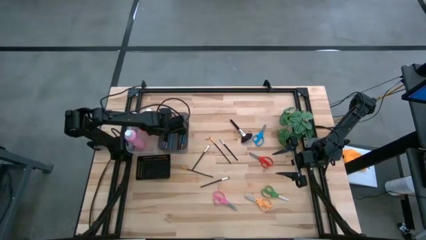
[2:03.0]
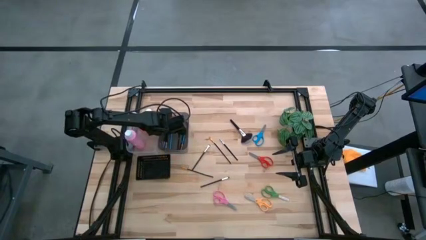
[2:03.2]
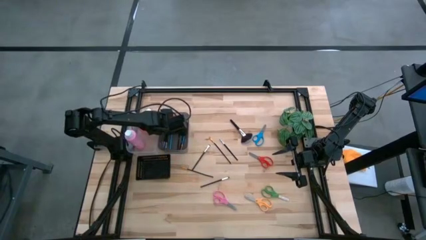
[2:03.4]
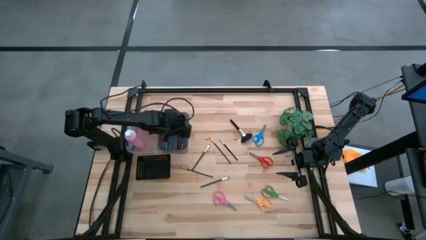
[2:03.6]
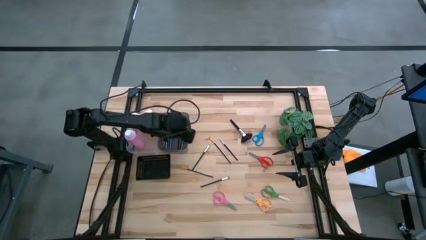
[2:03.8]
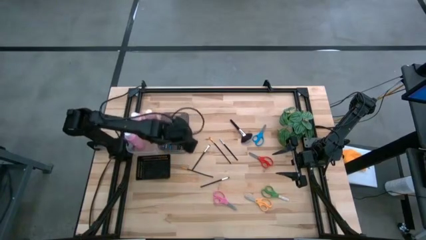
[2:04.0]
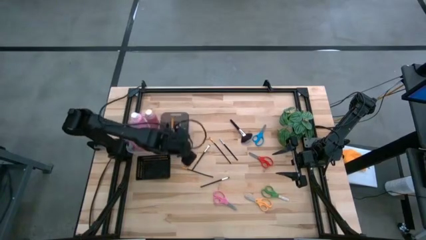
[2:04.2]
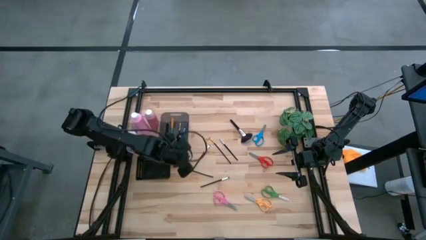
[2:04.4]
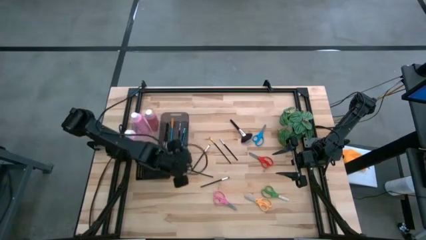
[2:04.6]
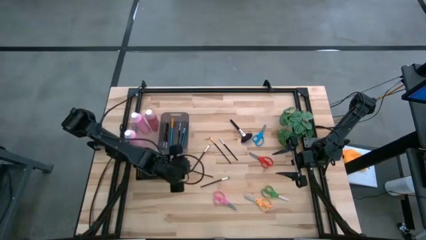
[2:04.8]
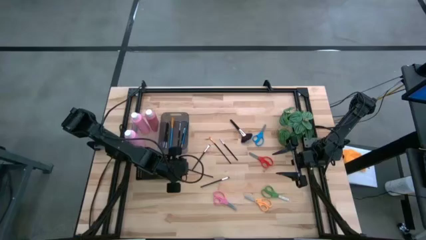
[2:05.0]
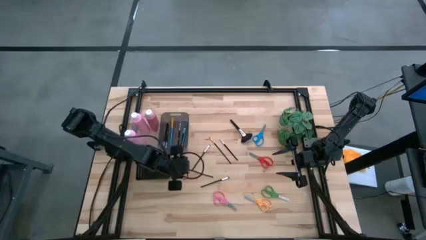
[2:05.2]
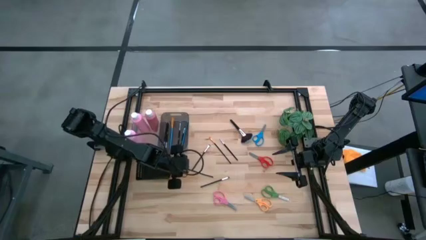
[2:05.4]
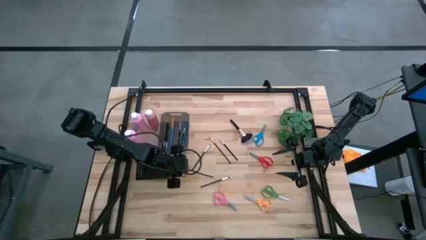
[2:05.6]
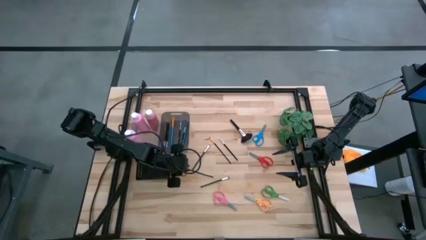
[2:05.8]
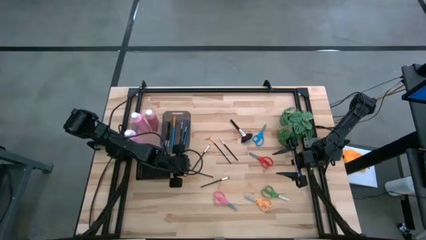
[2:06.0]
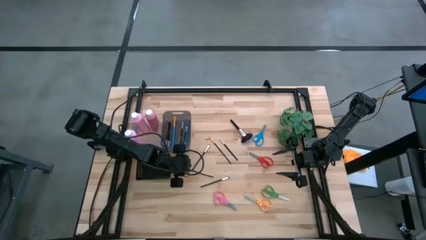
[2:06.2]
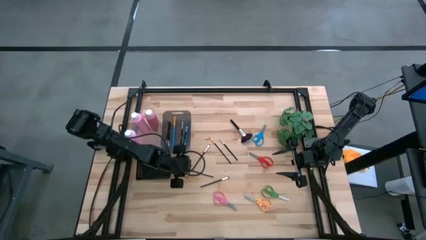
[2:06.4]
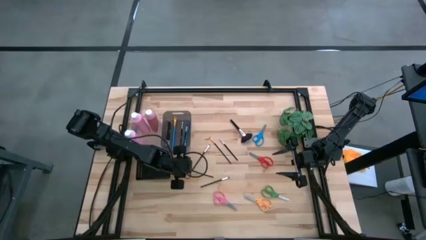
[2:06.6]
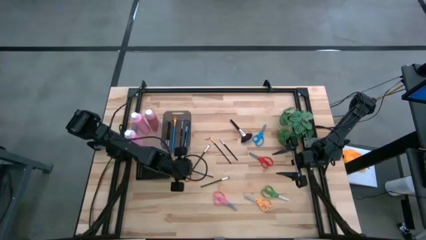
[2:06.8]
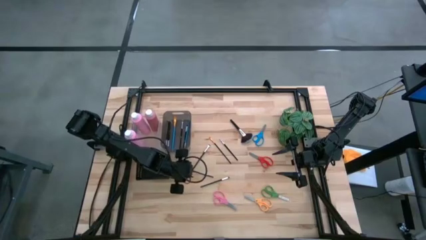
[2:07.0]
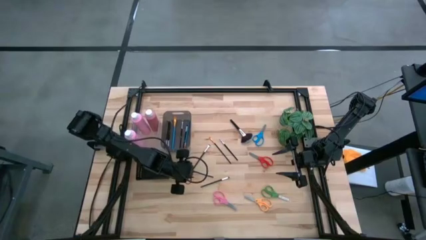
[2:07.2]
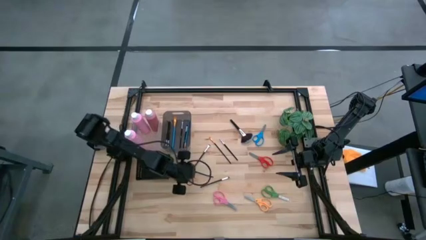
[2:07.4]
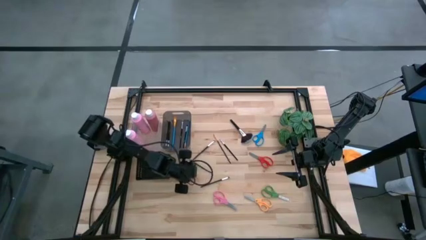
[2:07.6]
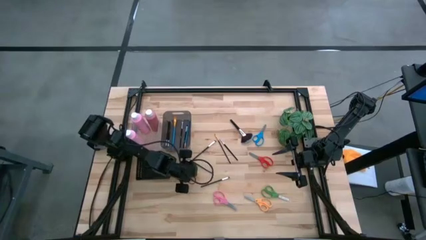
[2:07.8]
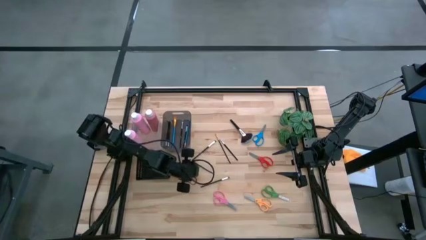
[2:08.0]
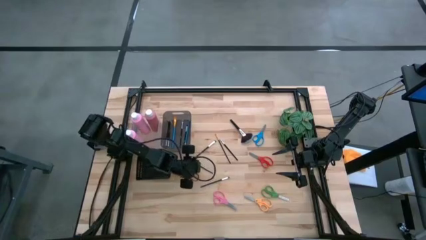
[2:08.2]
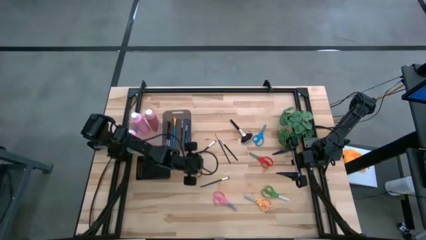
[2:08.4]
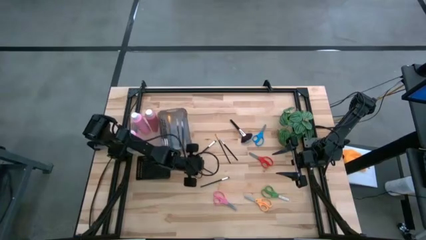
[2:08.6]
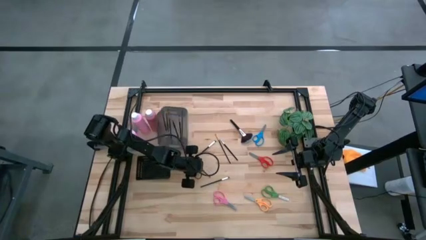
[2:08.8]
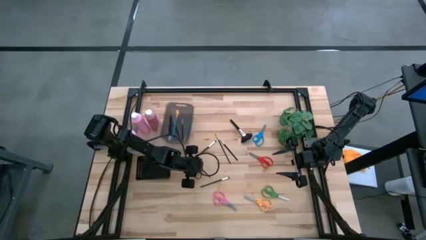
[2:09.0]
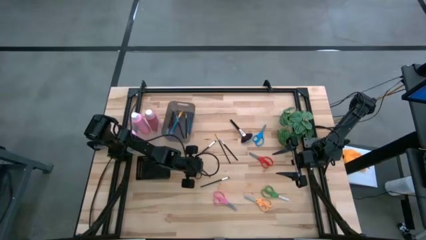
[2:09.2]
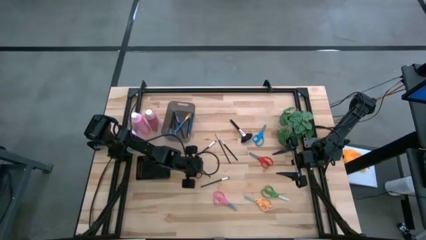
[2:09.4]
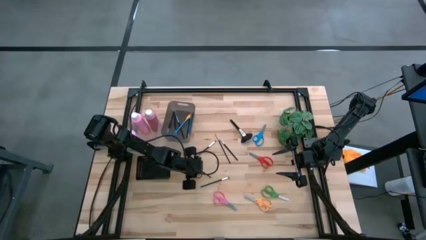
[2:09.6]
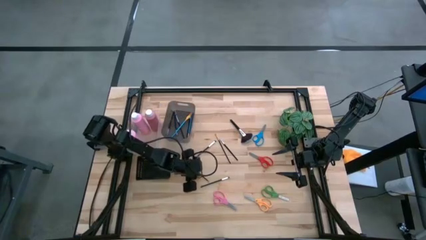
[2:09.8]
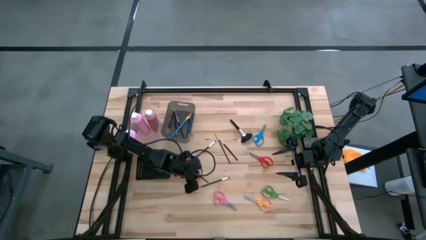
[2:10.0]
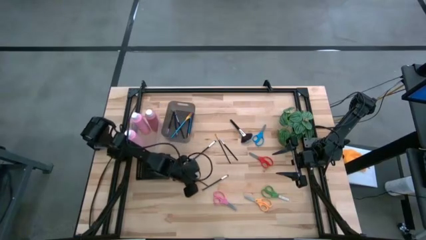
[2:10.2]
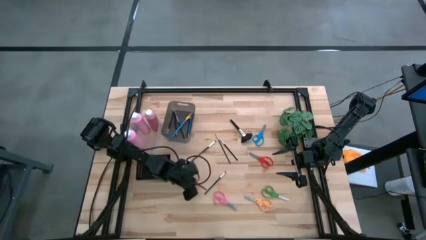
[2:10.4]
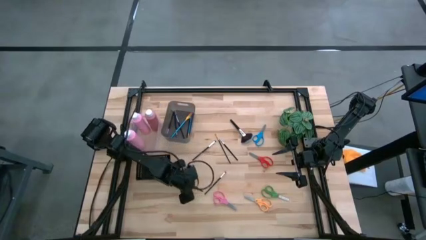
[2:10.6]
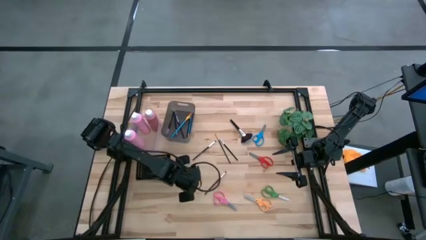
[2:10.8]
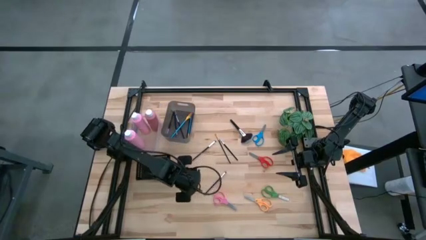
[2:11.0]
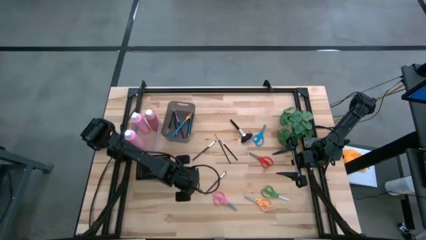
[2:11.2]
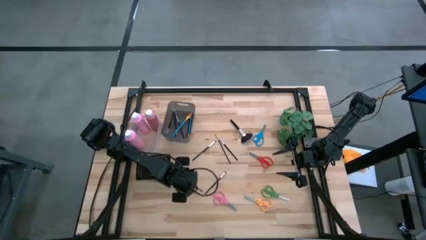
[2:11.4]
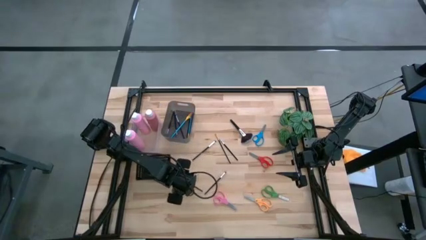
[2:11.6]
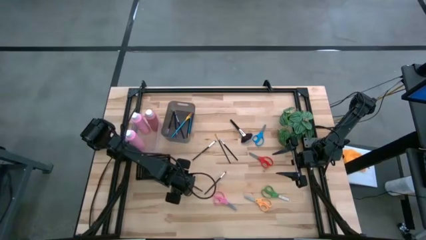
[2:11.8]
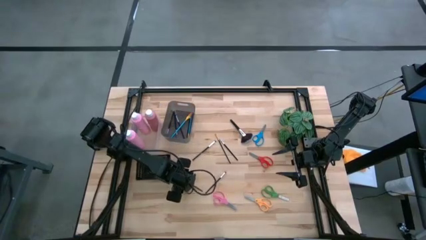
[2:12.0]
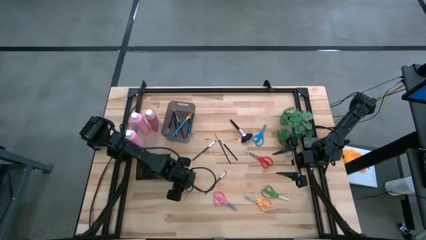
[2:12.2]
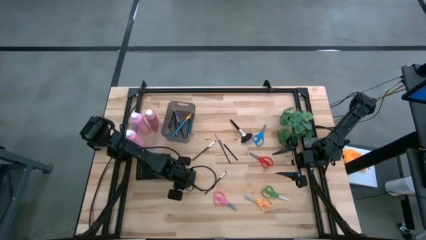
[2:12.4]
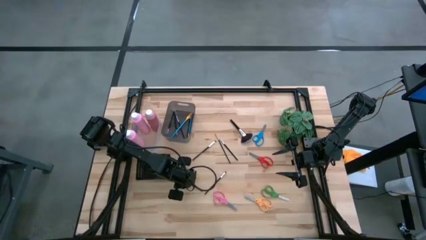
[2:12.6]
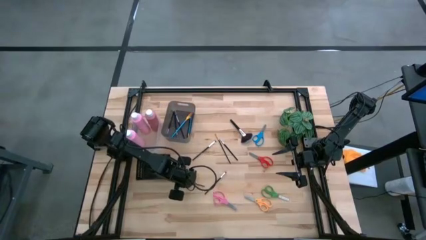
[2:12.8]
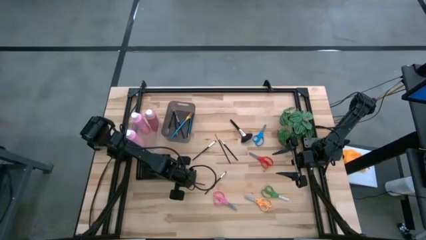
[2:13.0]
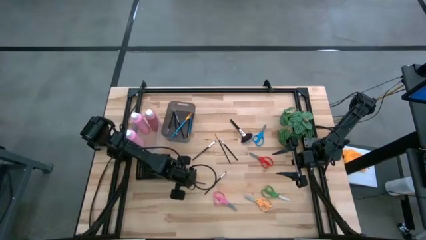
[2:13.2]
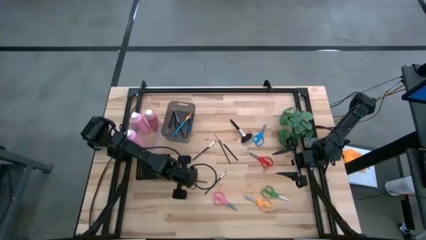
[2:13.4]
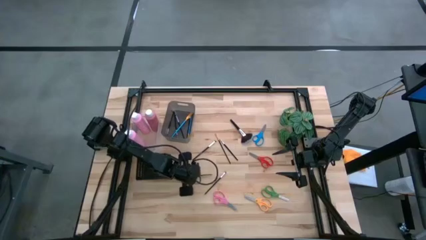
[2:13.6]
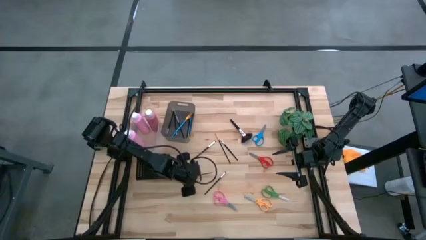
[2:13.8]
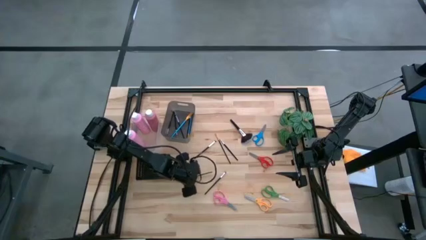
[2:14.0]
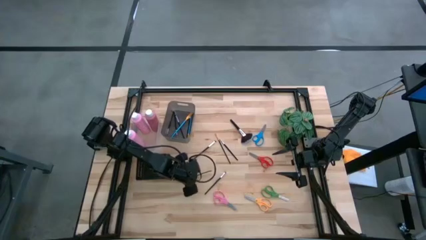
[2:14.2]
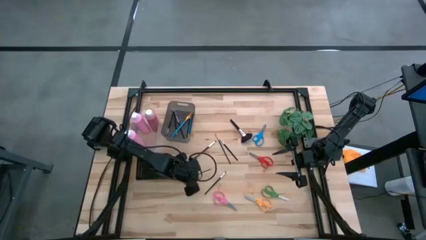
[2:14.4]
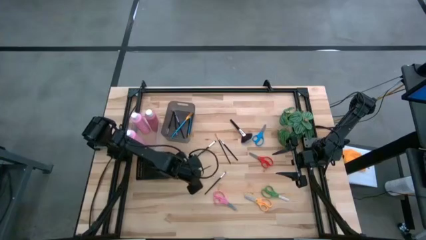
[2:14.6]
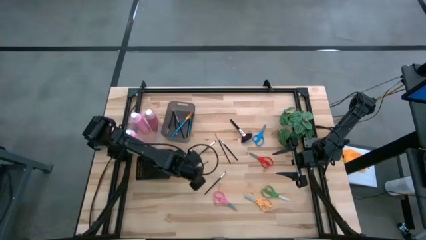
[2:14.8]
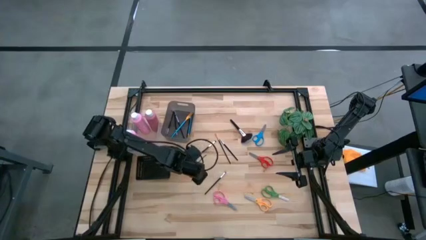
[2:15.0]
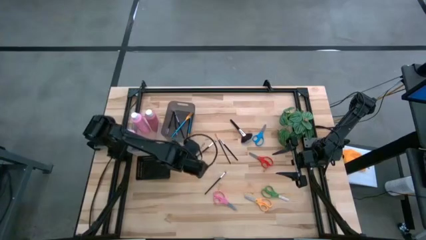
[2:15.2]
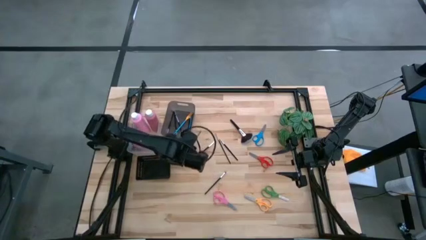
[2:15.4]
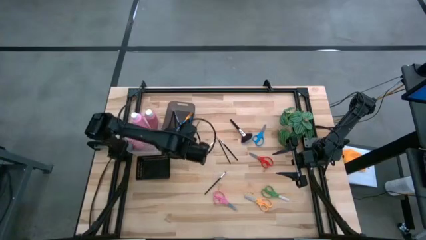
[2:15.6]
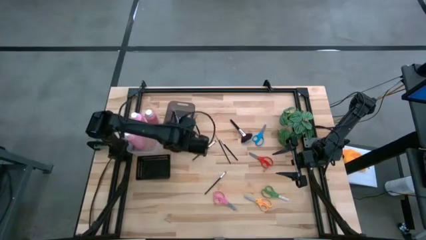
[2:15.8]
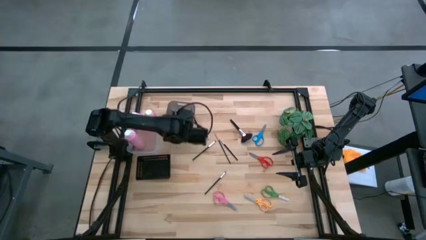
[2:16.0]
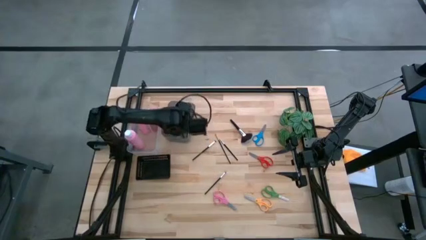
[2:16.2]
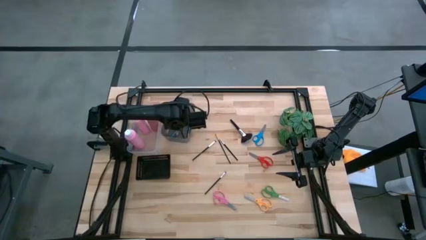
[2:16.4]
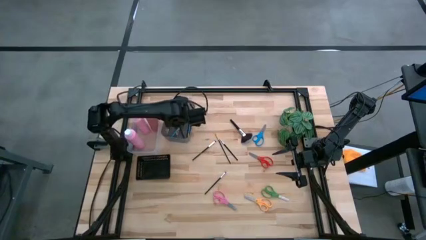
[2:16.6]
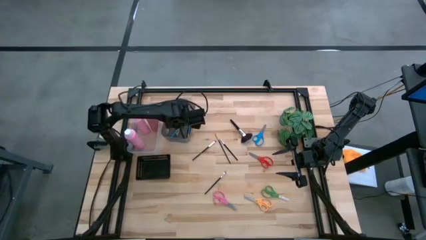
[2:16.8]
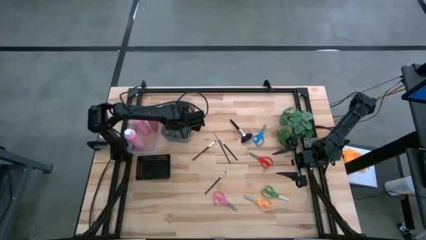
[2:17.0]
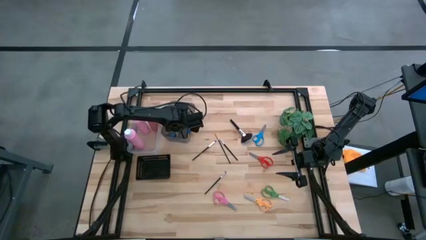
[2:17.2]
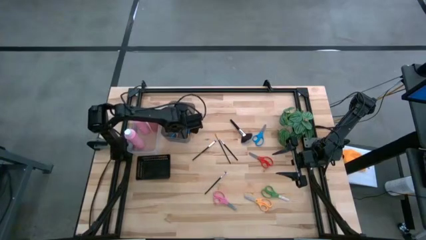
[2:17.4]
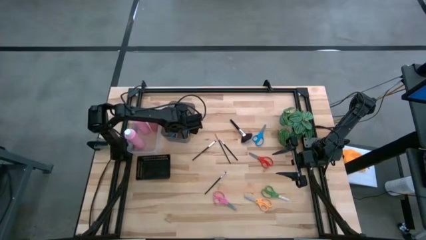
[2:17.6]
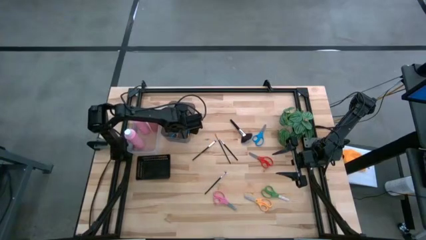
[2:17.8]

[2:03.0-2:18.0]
Task: Pick & Place Paint Supplies
Put the middle gold brush into the black bin
